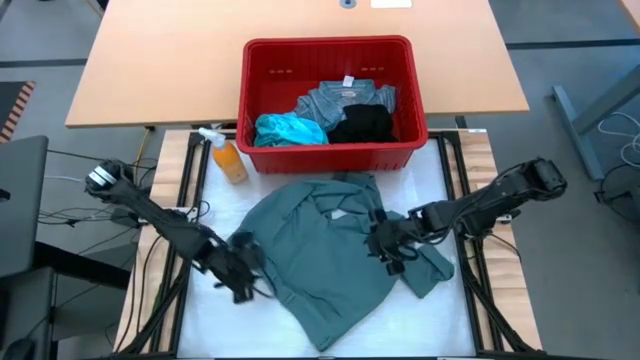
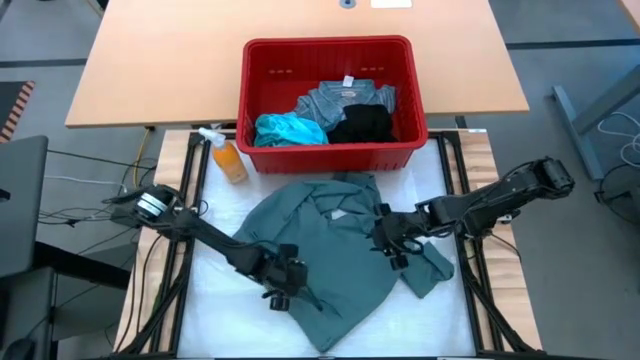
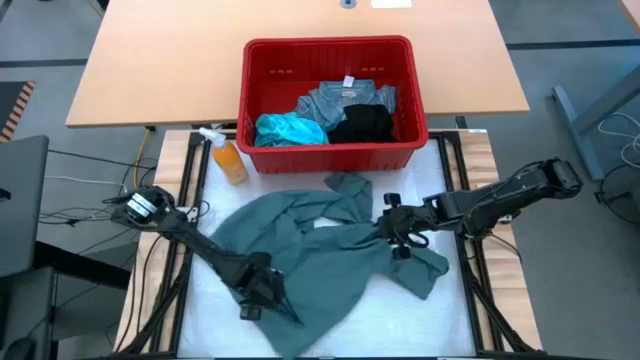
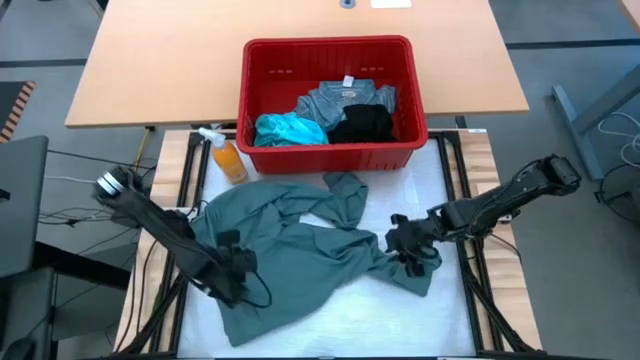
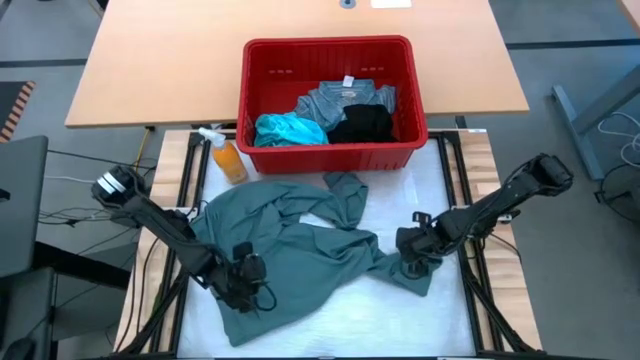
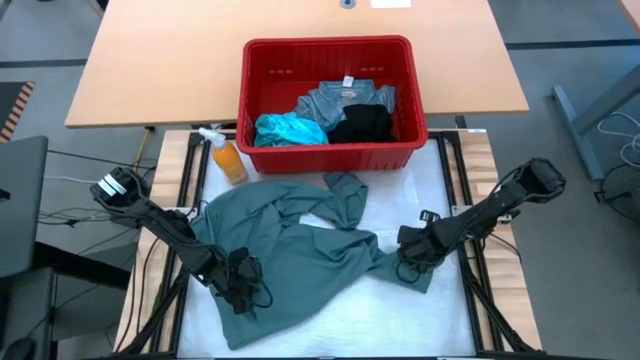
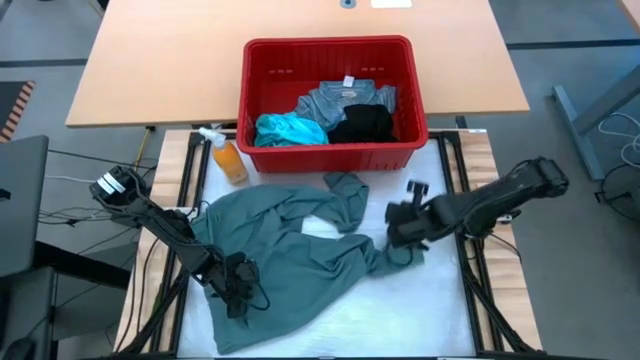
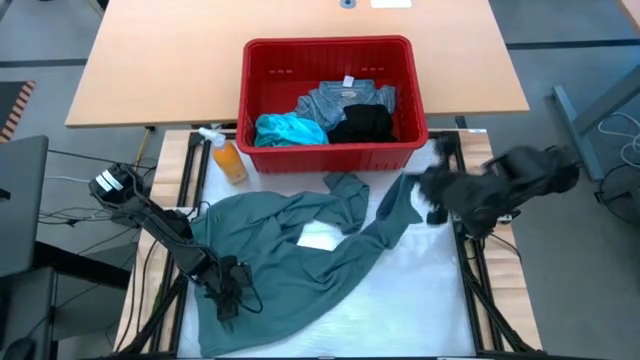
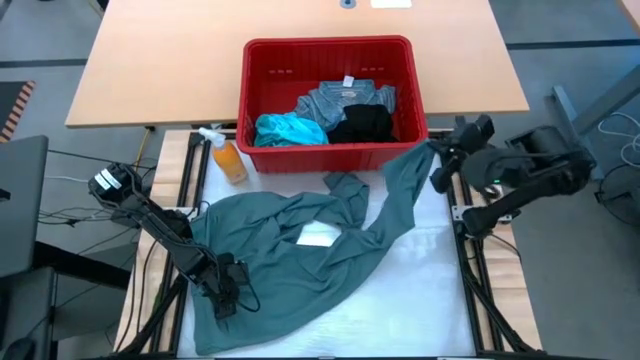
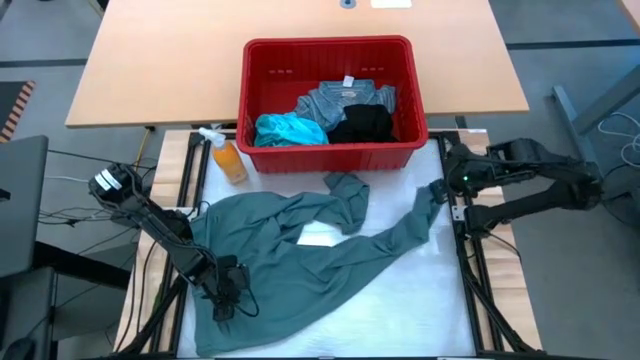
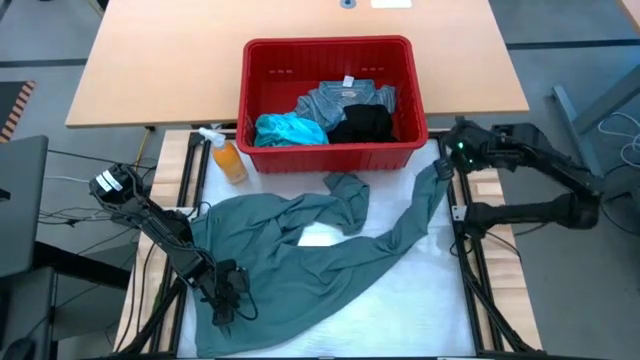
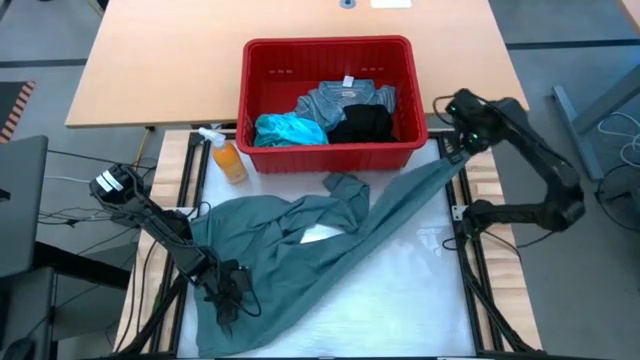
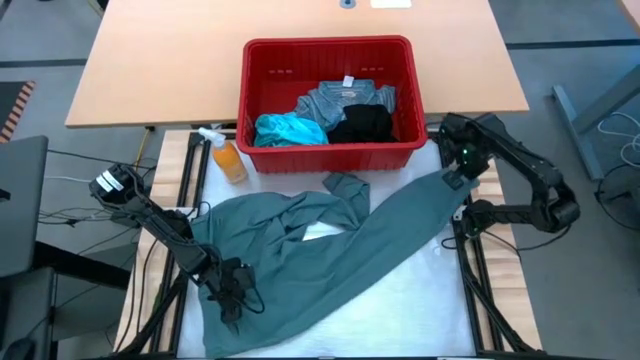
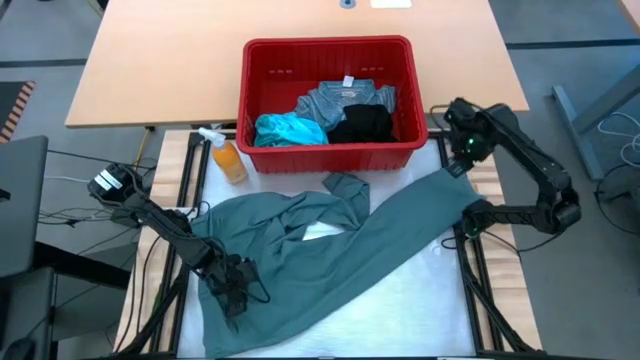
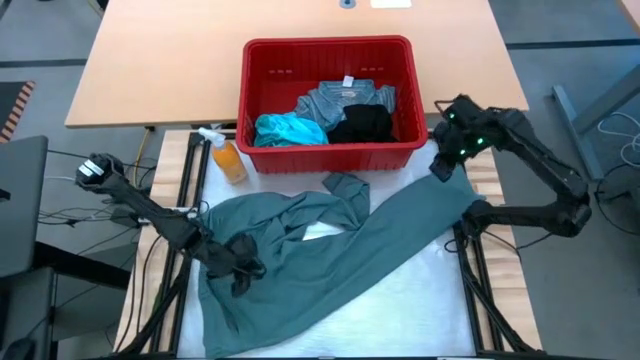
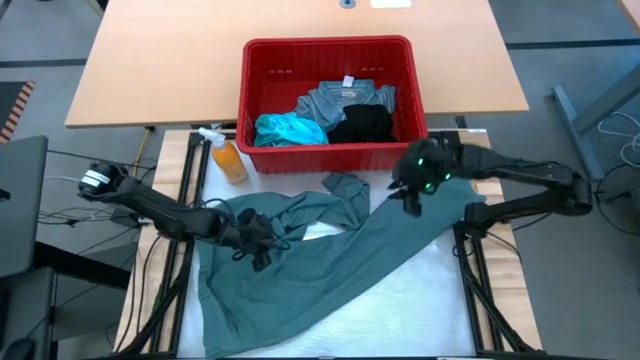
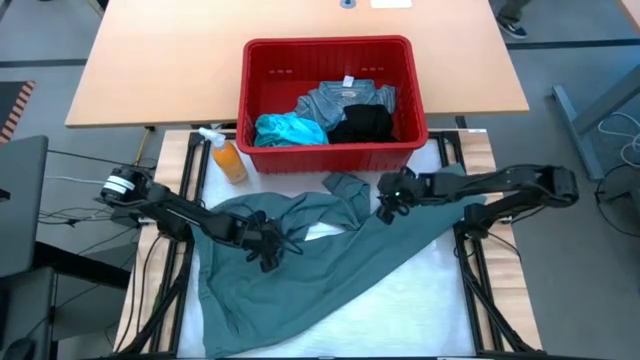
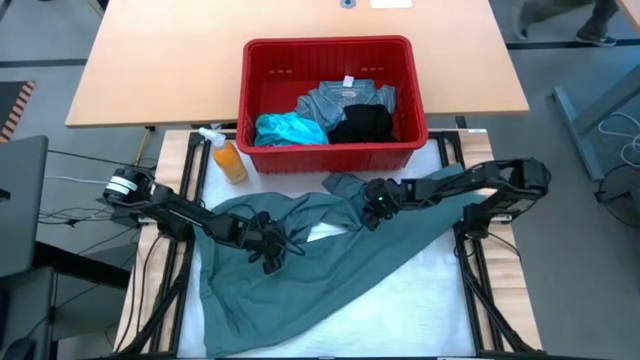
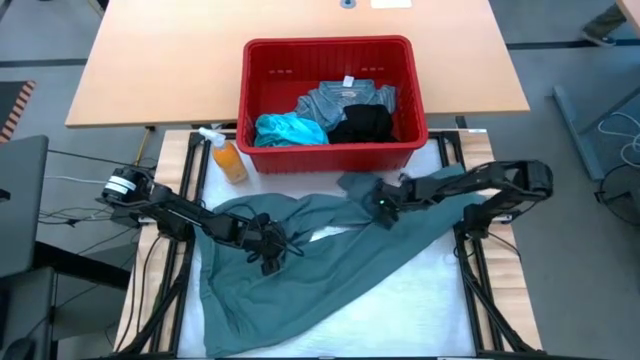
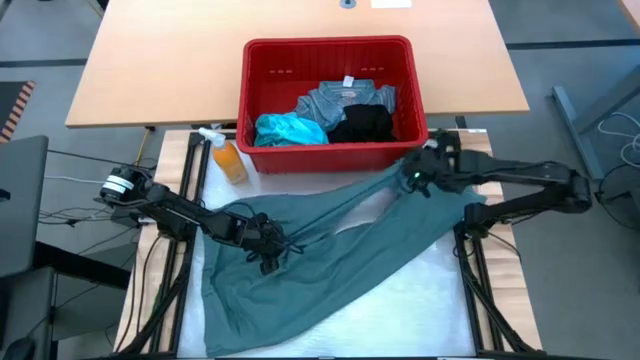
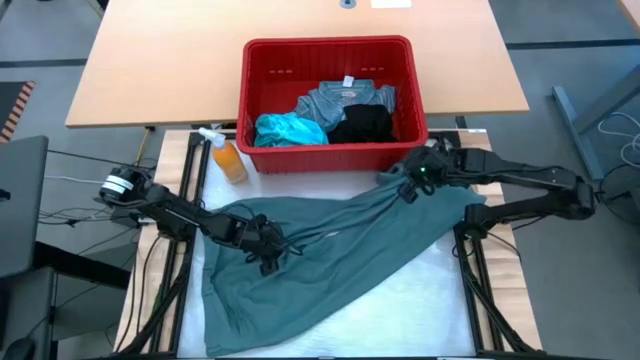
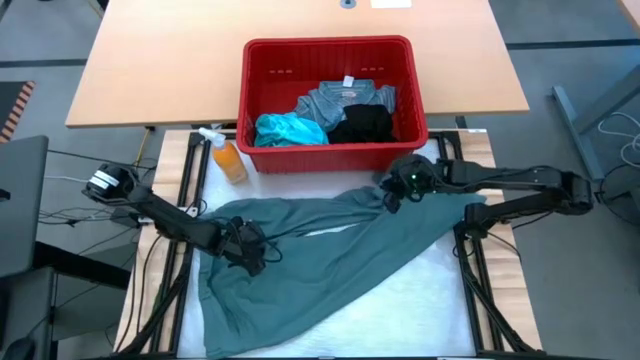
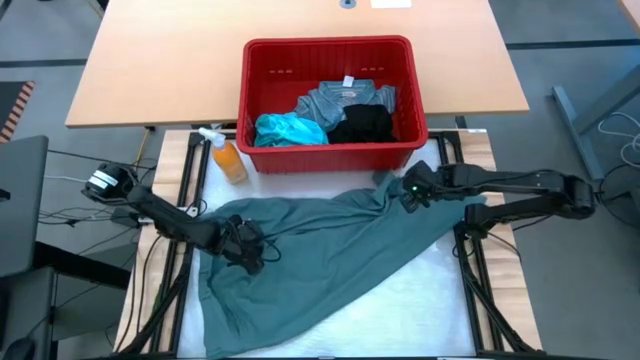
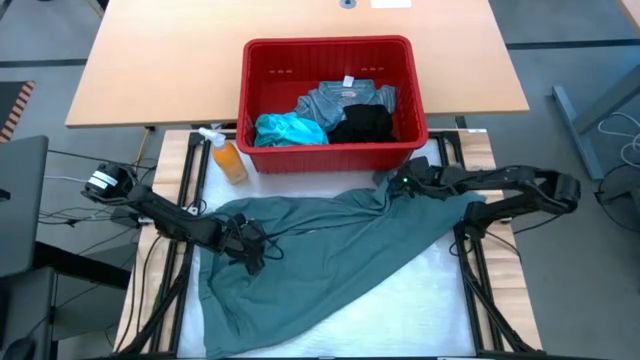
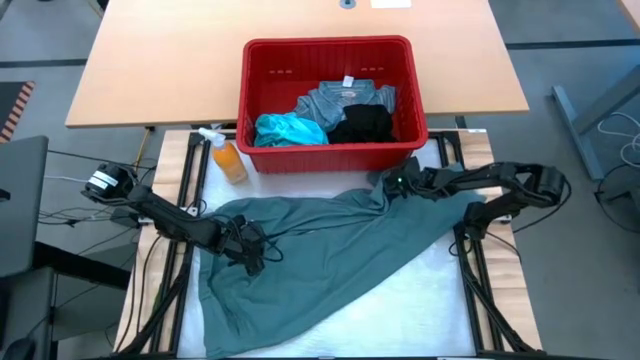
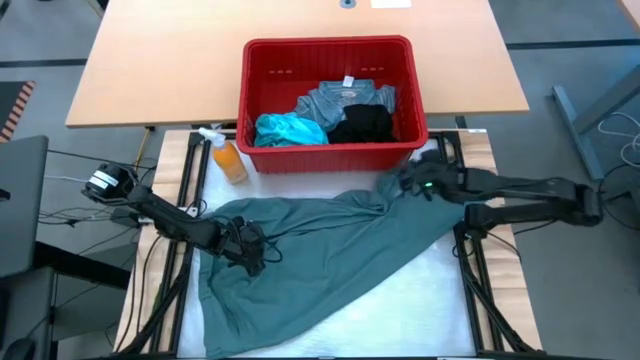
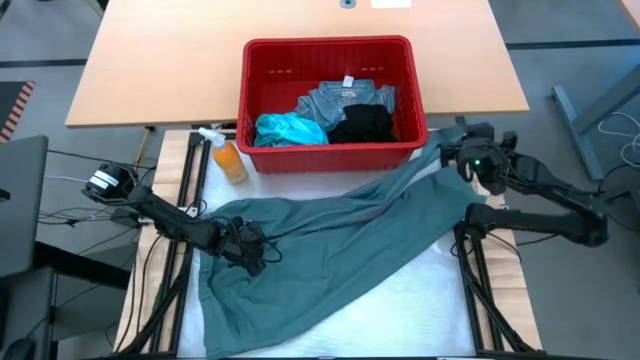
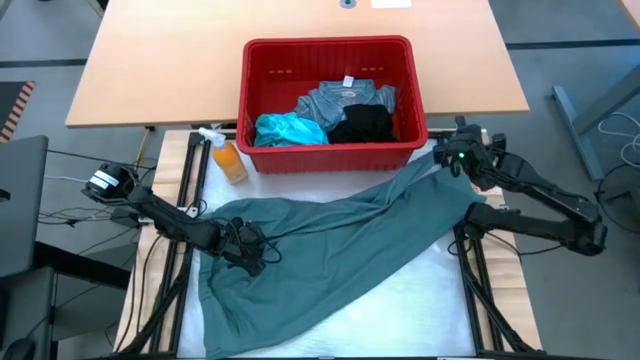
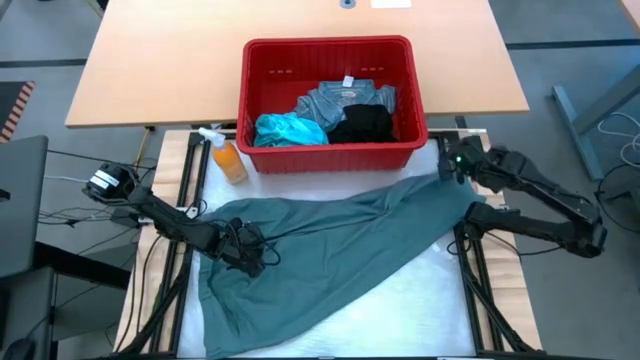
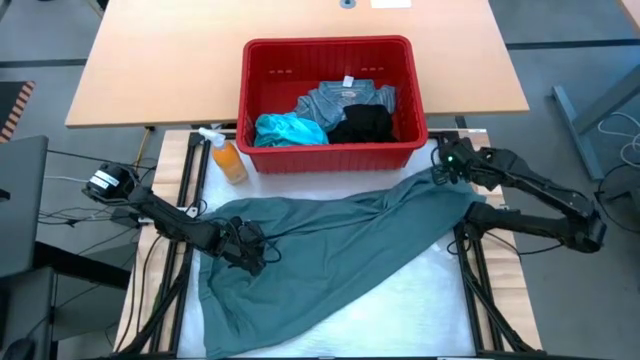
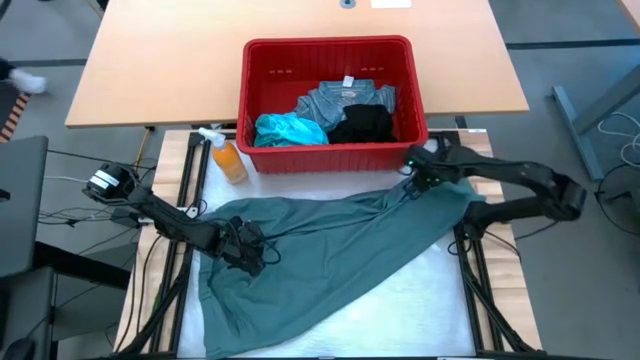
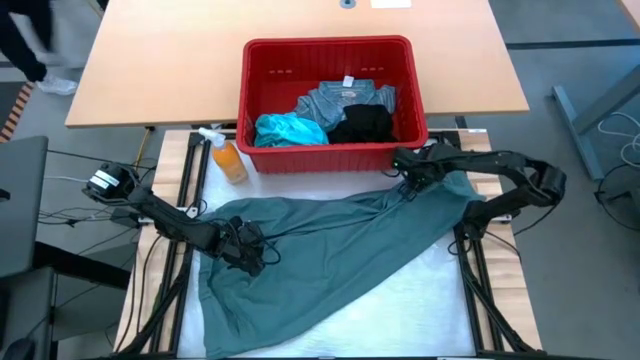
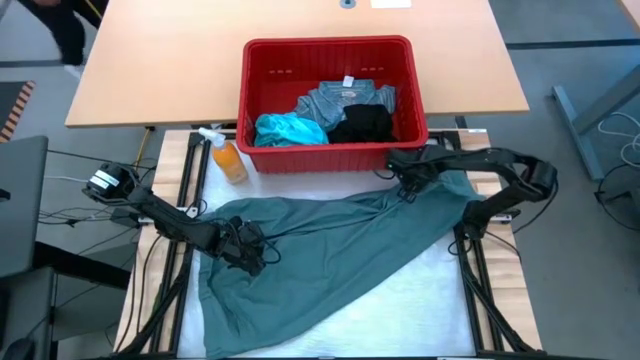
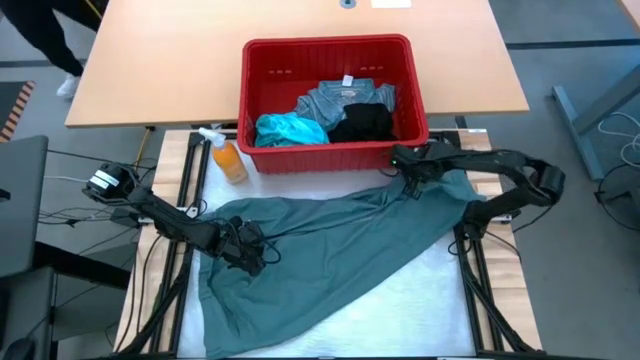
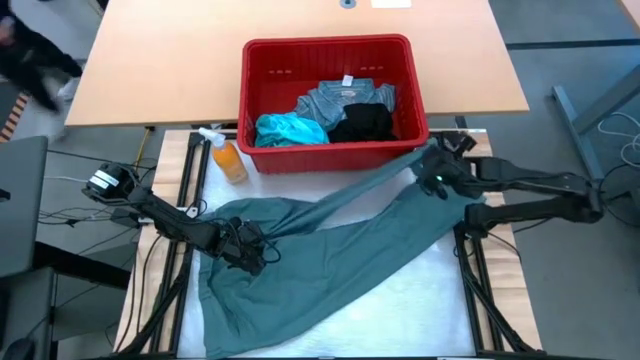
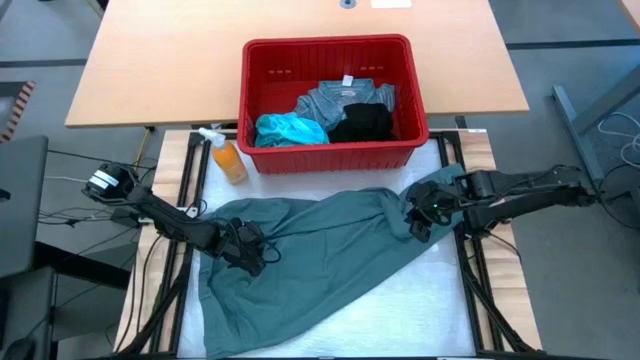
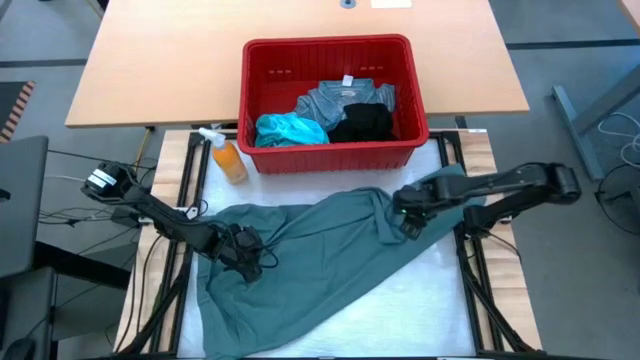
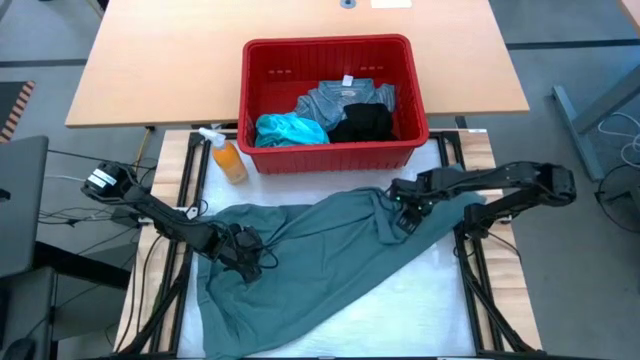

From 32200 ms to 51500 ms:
Task: Fold Laundry from Bin
Fold the gray pants

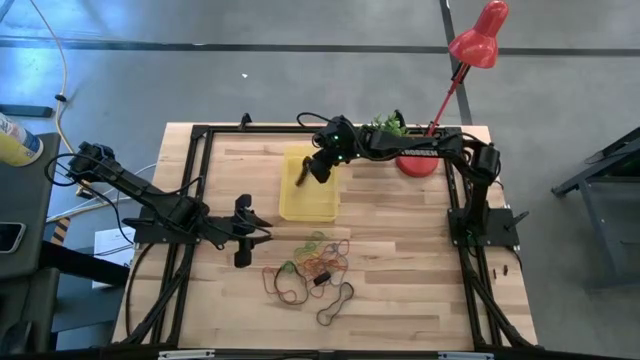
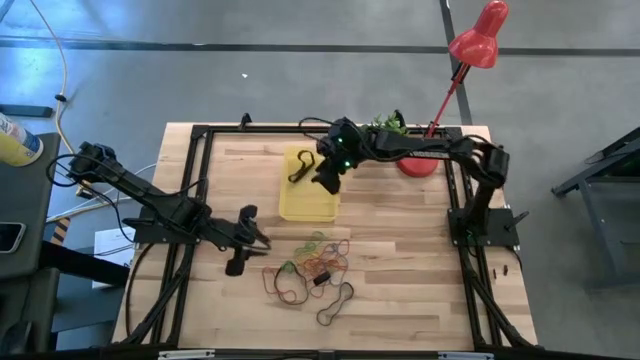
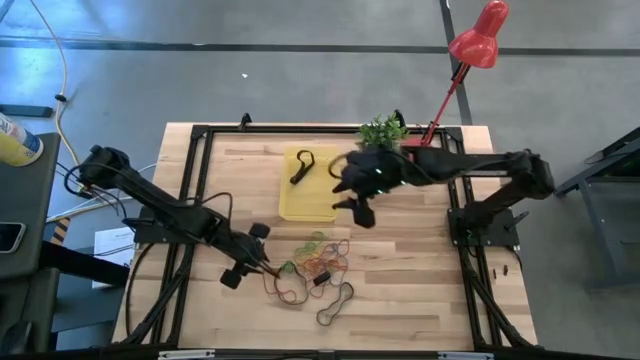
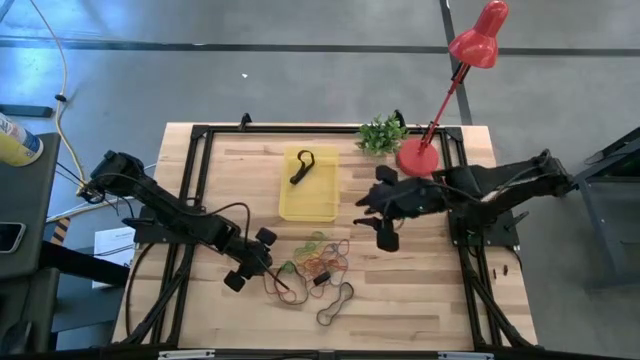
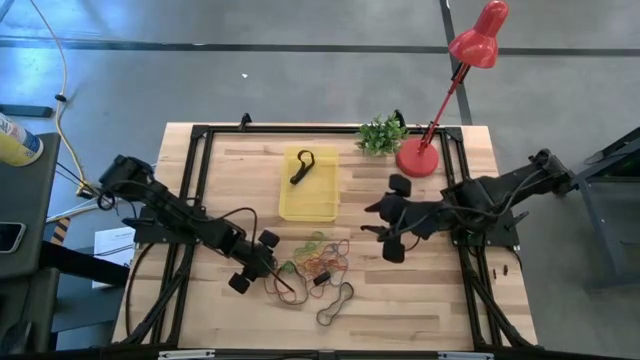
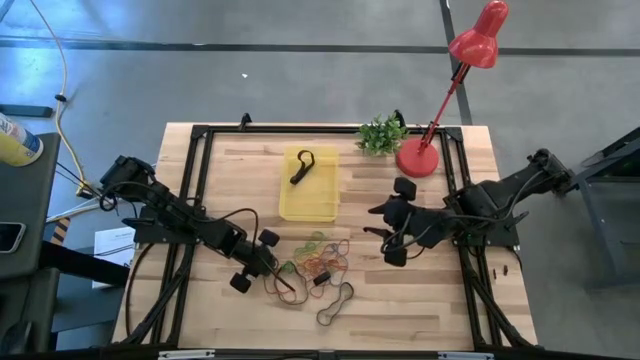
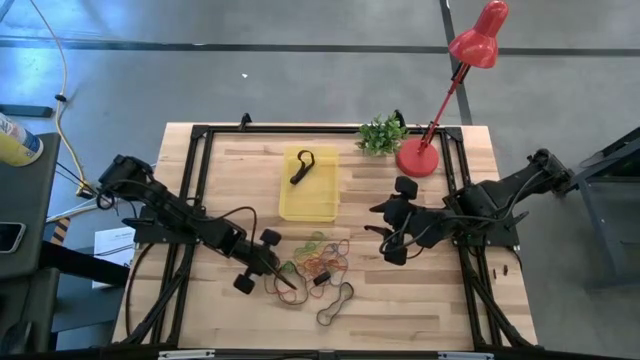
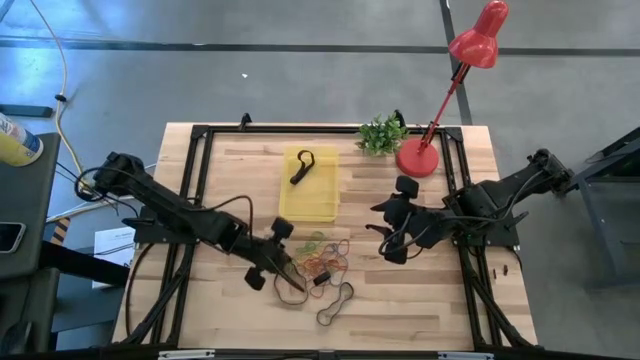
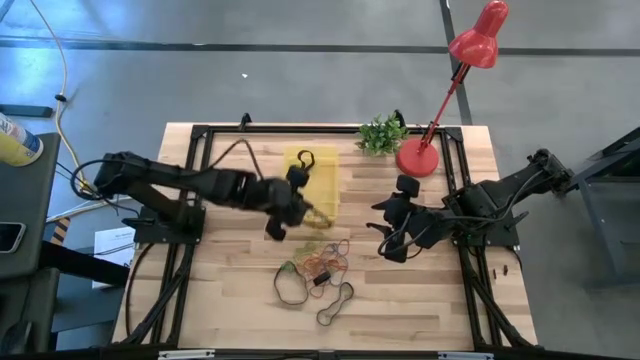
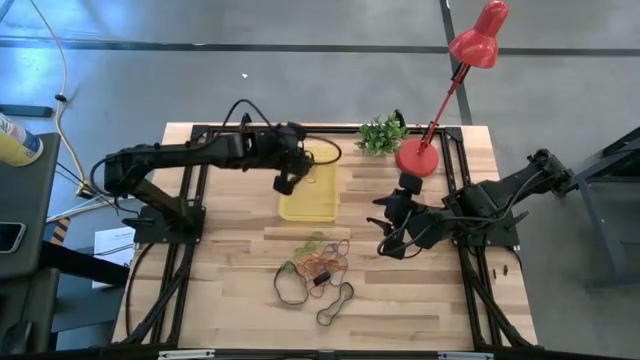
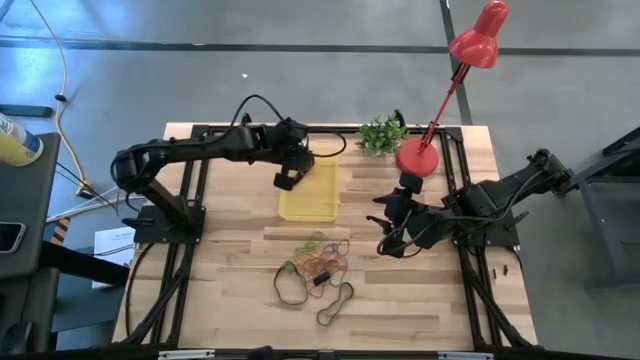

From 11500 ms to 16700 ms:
Task: Pick and place rubber bands into bin
Put the red rubber band into the yellow bin
